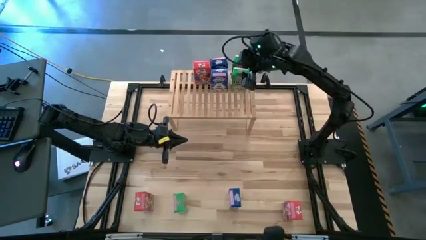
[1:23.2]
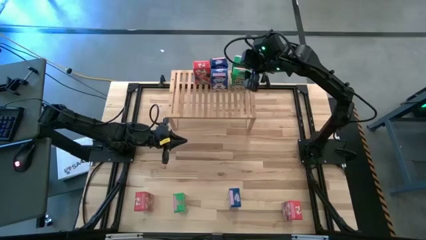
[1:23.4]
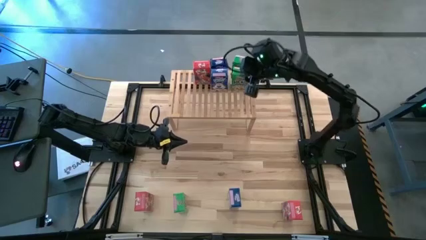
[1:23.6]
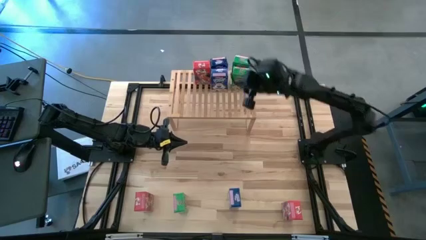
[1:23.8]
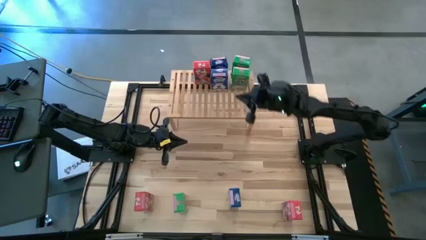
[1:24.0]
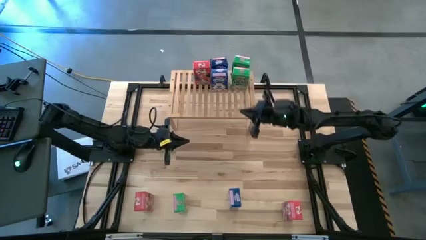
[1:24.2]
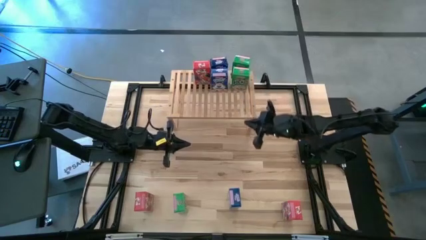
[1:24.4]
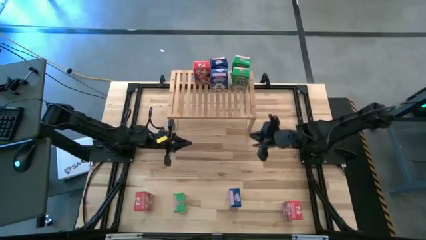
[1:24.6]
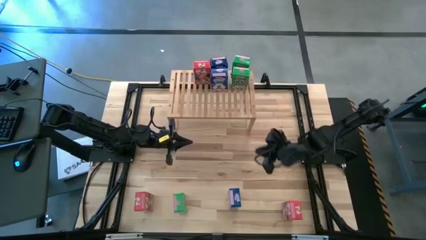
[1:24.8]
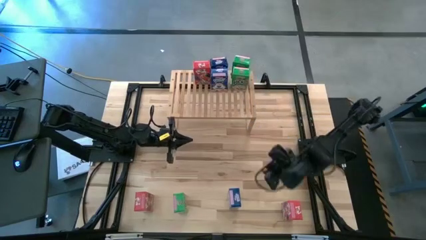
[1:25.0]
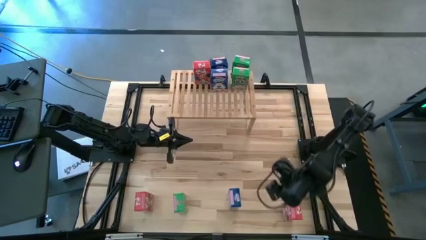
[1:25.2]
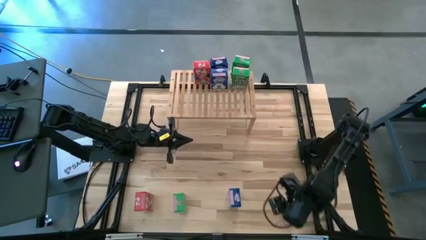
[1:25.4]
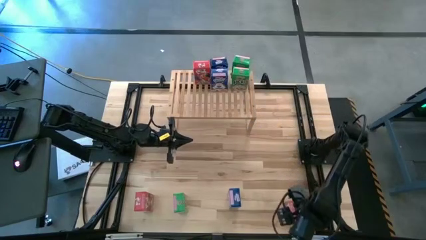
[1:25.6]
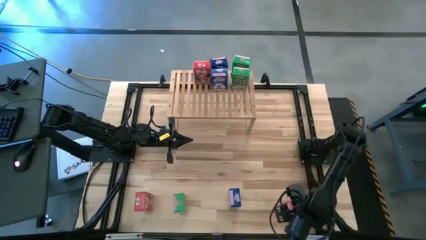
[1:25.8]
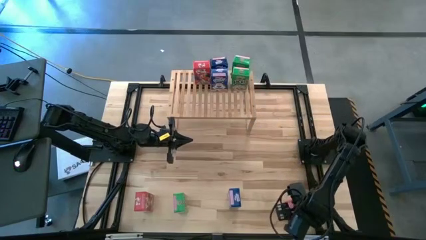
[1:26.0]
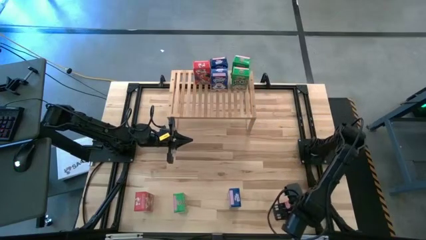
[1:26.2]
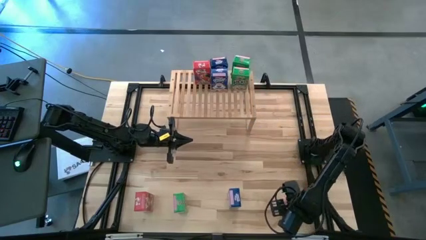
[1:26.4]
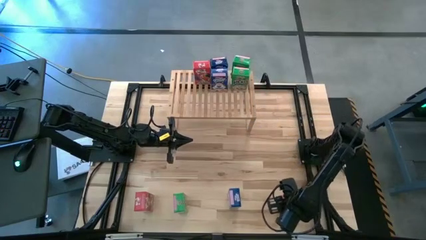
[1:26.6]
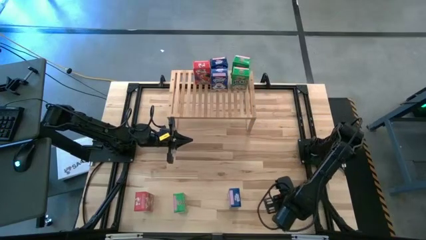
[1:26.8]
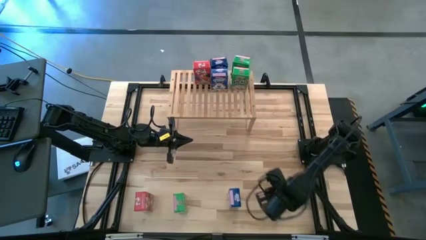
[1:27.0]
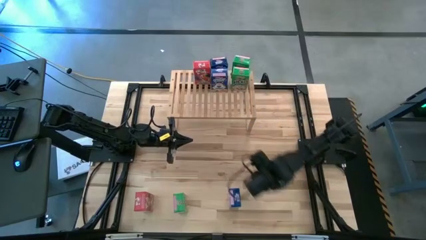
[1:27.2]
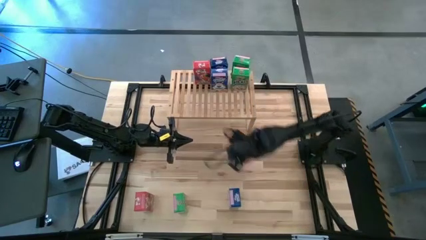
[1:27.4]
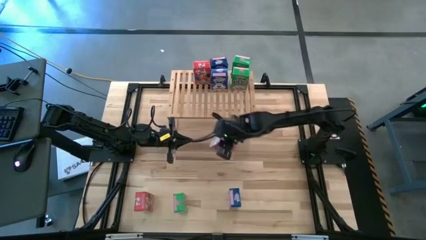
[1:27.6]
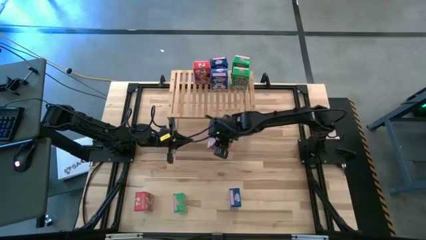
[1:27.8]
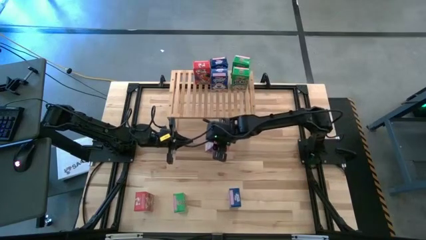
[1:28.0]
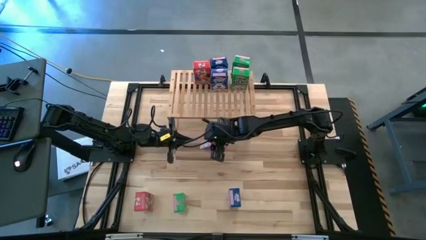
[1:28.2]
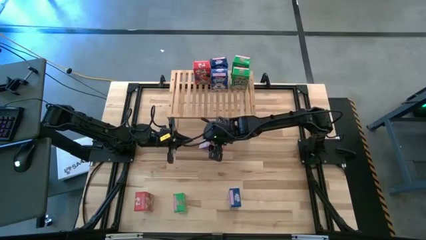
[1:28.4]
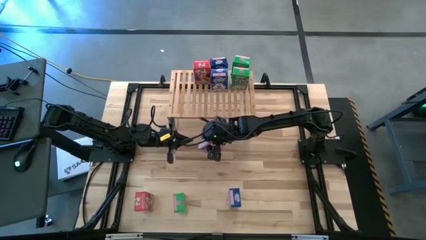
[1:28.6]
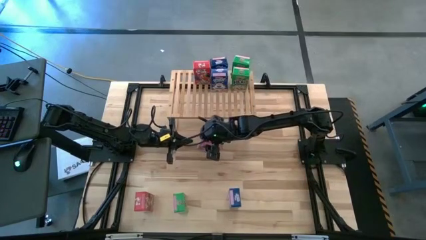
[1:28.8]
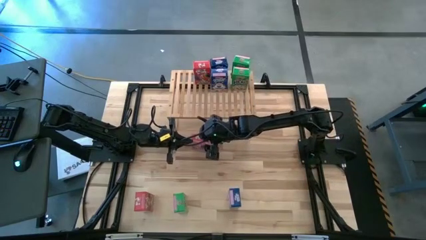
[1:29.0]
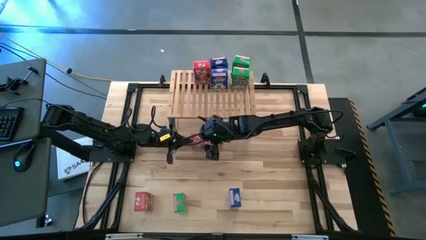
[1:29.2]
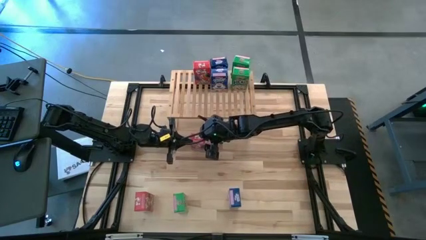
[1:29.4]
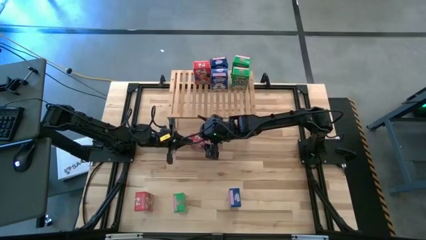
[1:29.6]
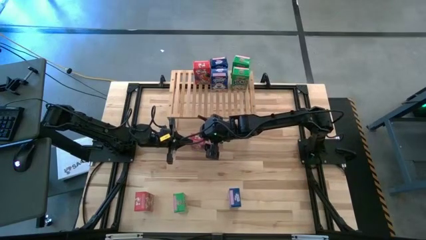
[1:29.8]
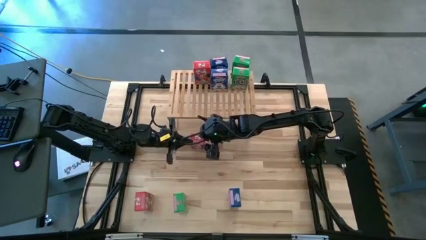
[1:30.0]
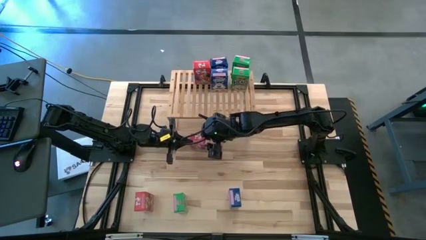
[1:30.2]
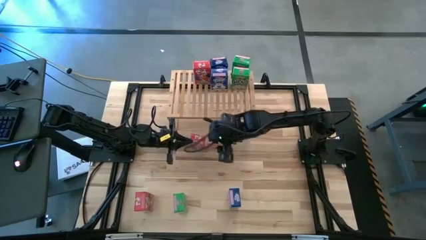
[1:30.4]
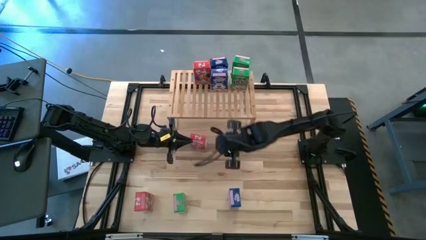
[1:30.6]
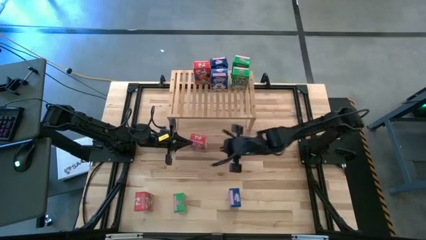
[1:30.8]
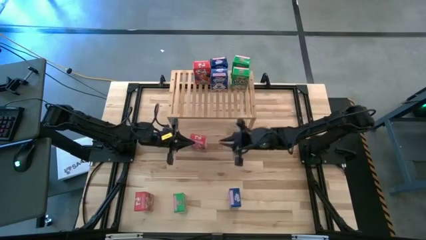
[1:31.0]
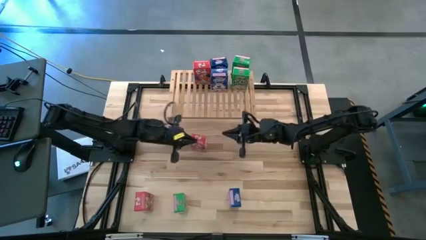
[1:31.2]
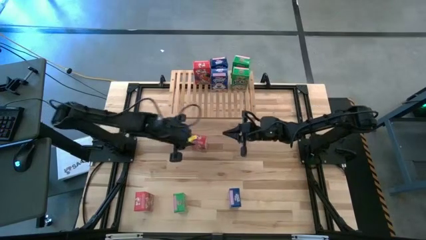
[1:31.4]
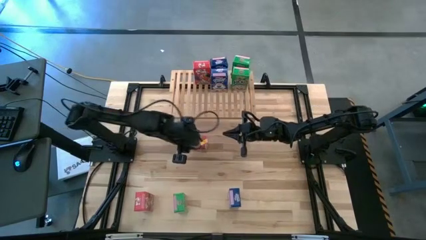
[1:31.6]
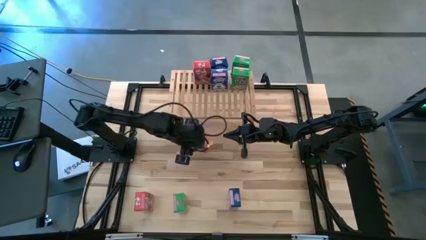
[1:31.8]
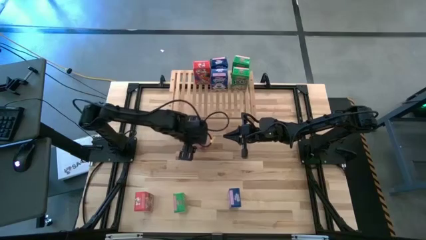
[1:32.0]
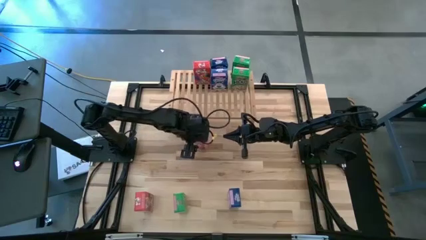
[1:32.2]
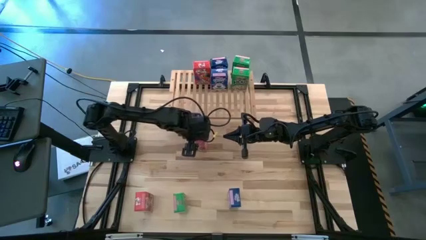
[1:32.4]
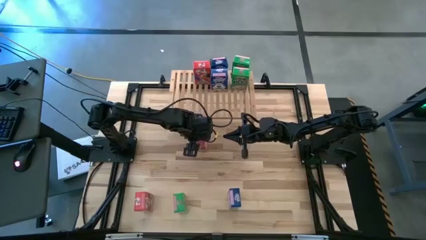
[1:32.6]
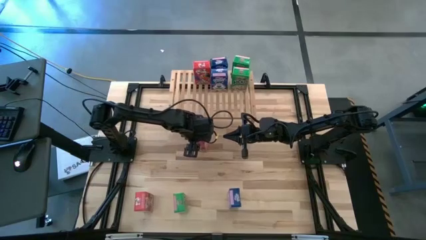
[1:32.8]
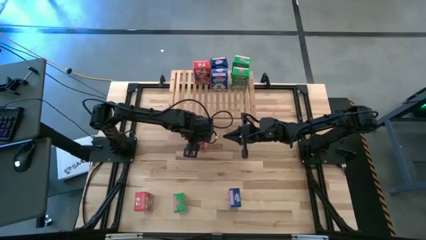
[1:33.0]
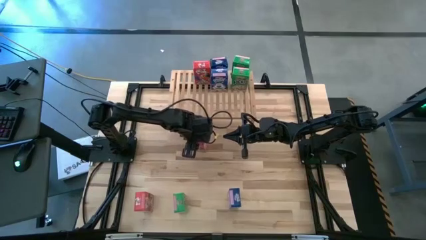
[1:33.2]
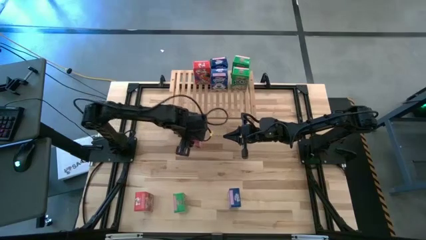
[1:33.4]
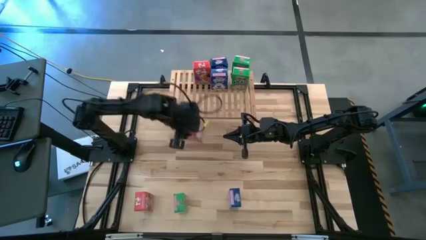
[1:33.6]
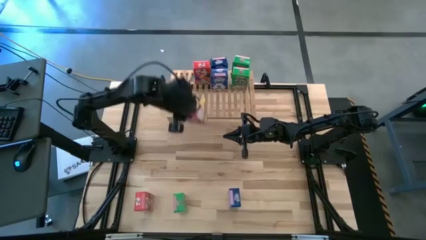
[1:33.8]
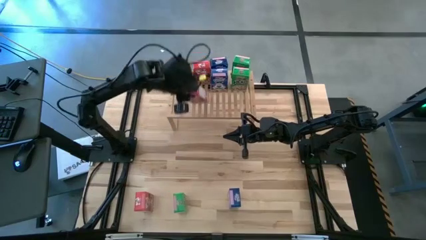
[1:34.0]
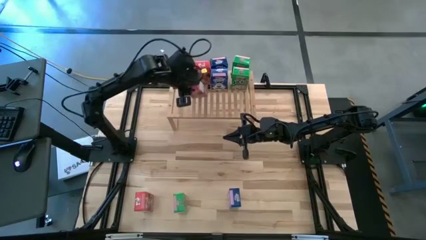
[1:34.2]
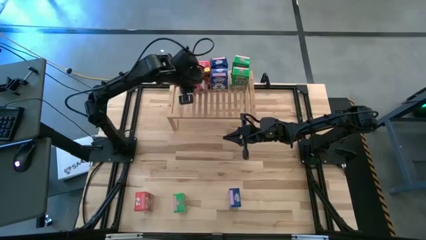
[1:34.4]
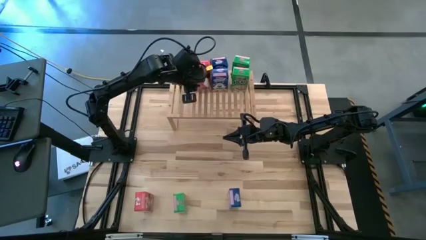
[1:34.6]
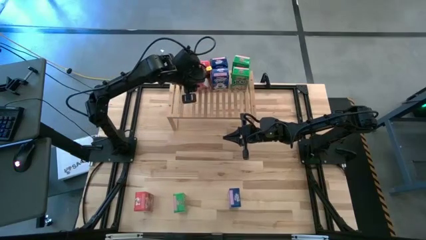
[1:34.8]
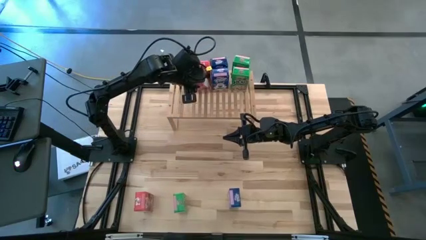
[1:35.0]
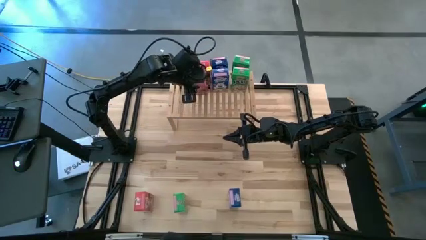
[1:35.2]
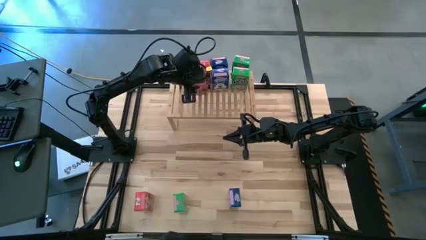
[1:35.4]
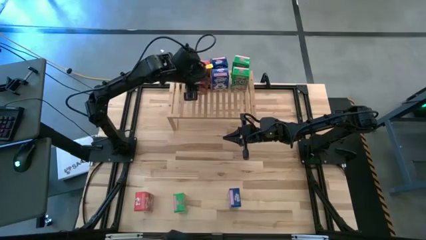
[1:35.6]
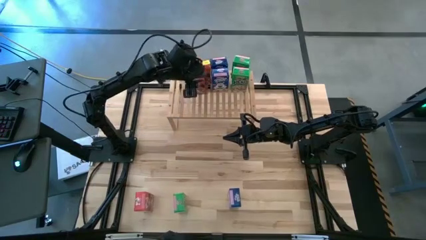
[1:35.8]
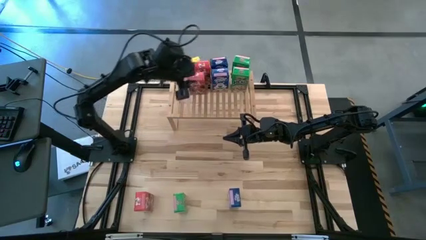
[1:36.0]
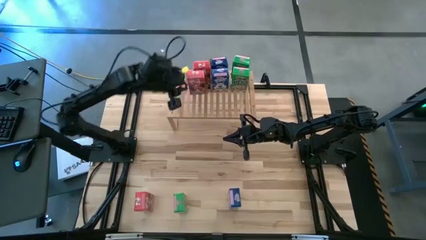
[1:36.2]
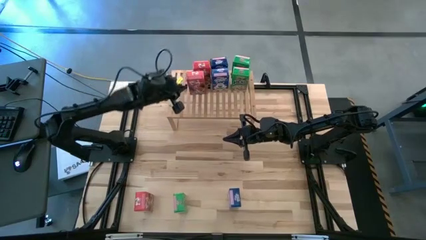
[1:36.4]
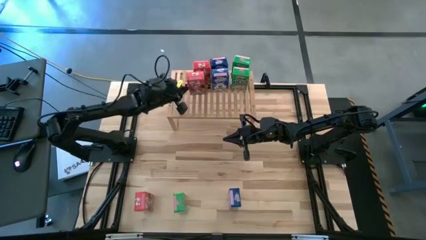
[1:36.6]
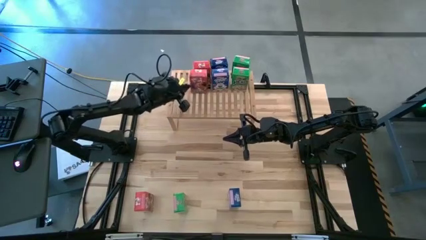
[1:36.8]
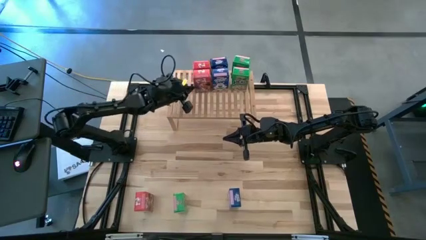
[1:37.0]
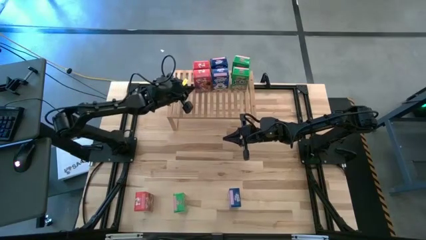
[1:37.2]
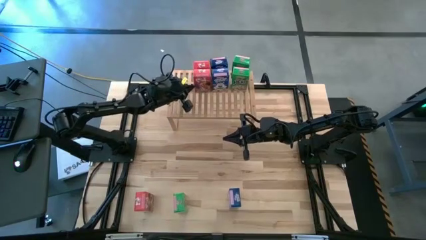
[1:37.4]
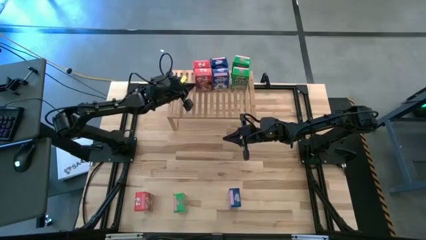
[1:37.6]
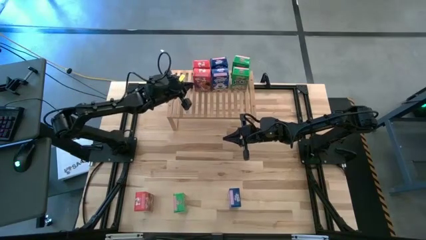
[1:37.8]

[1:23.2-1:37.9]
Task: Stack cereal on shelf
Put the right red cereal box aligned with the other red cereal box on the shelf
